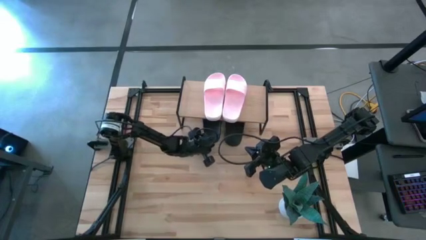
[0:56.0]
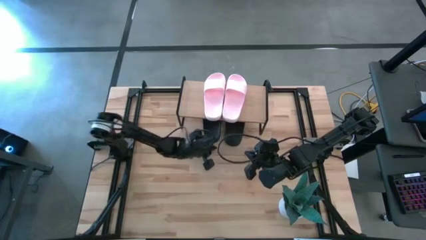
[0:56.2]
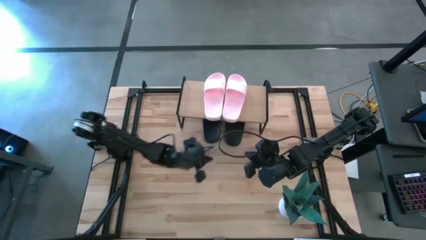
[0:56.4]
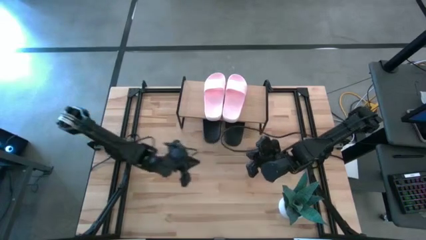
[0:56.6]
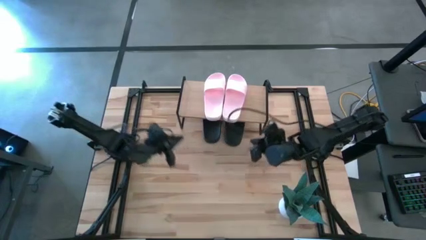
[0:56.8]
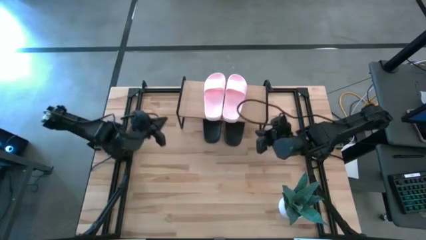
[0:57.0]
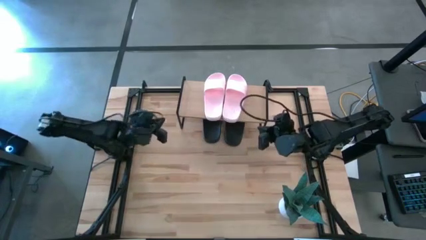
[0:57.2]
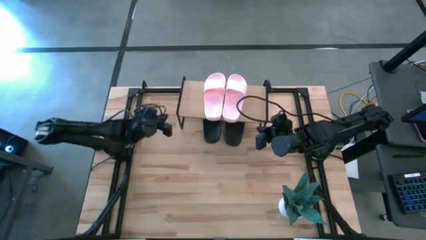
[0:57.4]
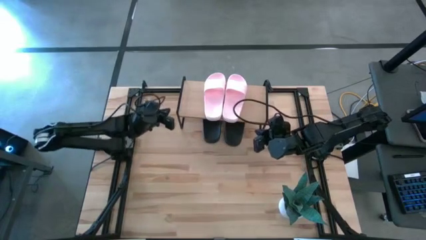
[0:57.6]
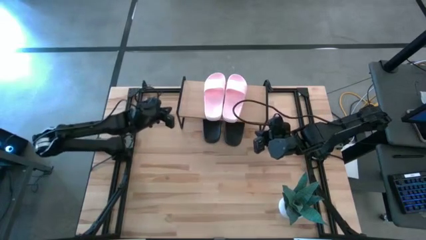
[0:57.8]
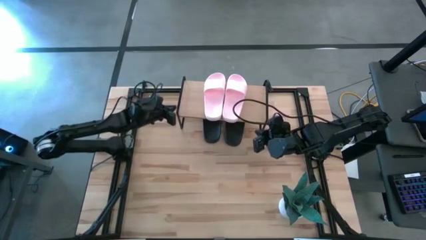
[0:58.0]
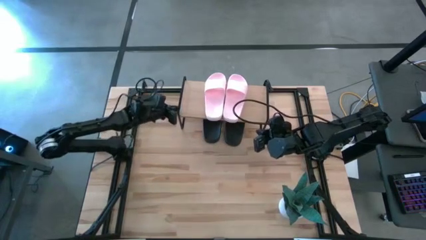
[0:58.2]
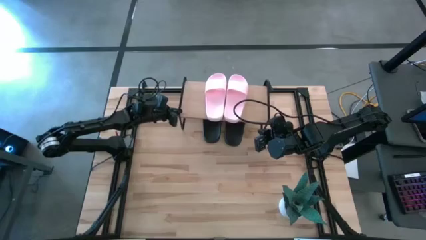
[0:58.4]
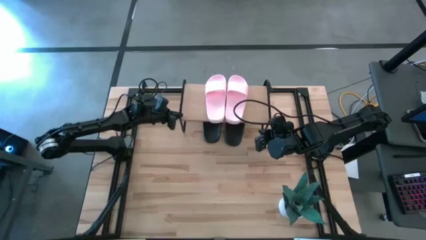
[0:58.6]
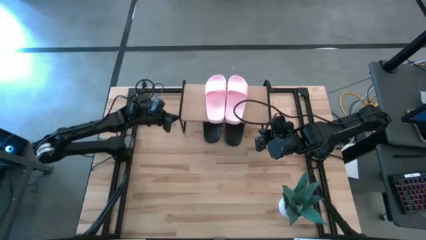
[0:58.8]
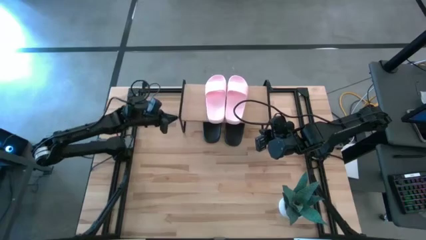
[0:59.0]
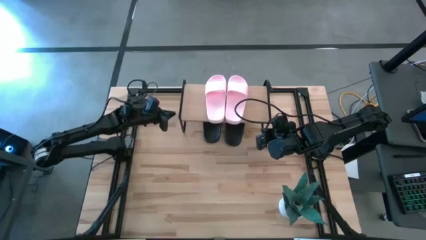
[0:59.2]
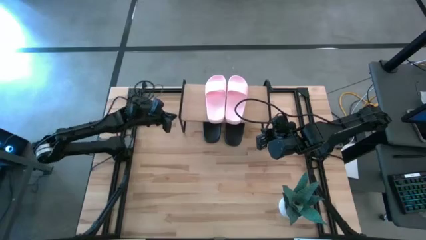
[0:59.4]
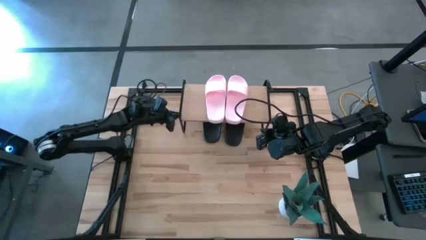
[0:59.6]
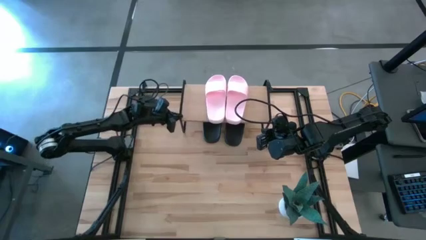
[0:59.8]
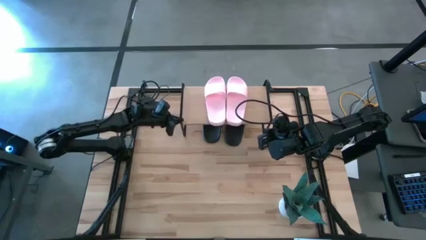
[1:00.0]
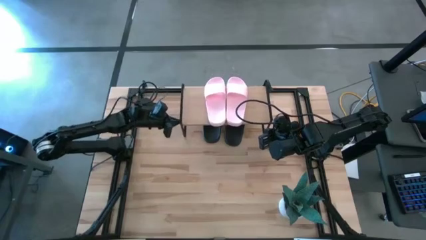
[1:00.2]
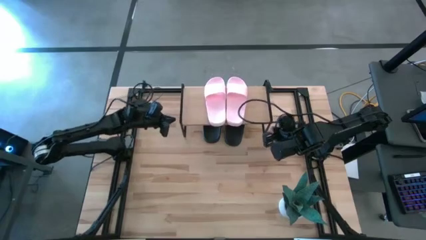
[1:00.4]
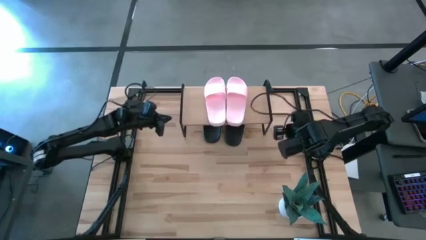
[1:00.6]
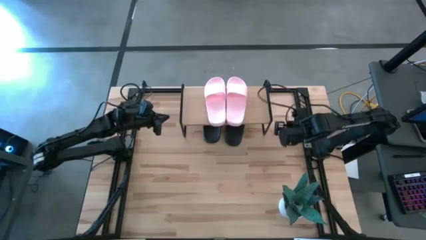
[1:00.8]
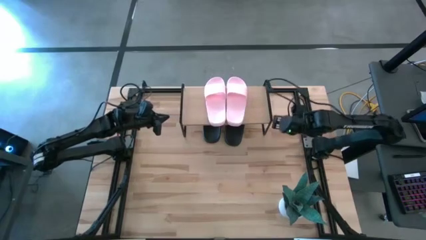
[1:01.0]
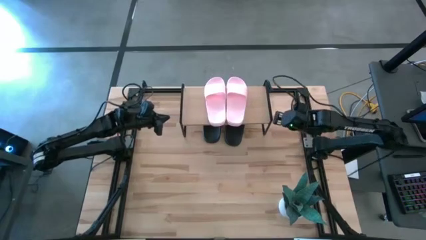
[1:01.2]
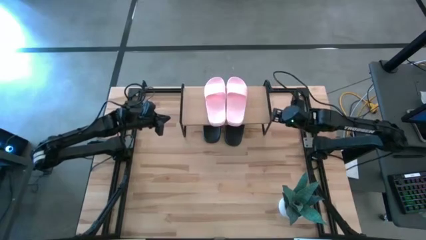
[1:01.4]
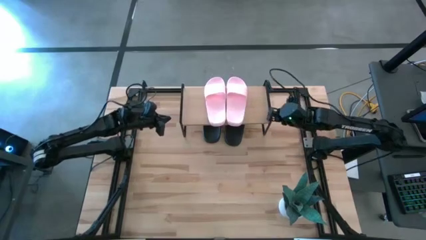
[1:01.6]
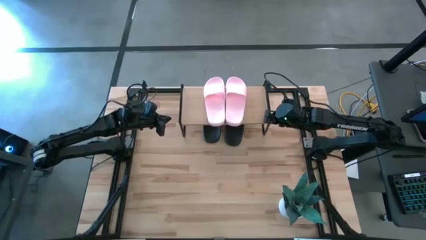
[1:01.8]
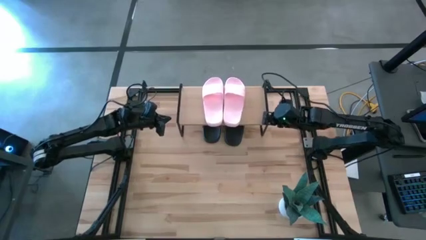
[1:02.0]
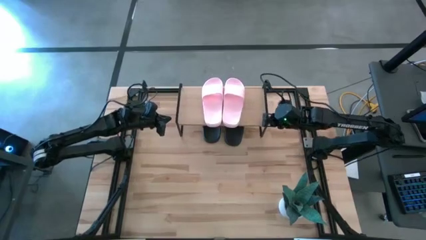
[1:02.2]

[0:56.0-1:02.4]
Task: Pick and place slides into the shelf
Adjust the shelf

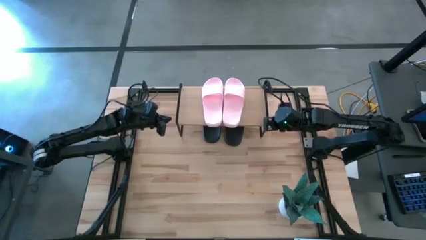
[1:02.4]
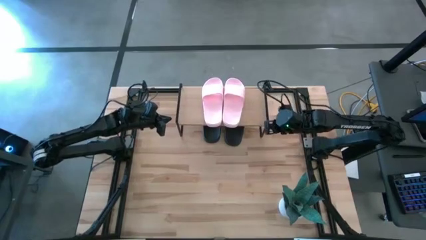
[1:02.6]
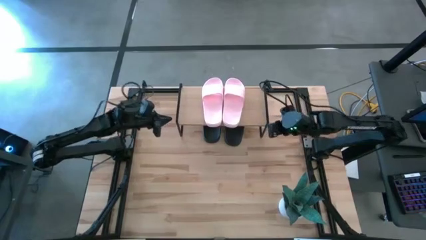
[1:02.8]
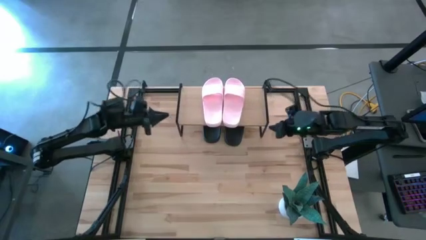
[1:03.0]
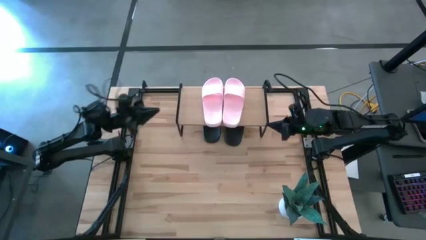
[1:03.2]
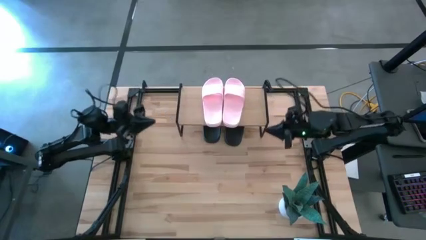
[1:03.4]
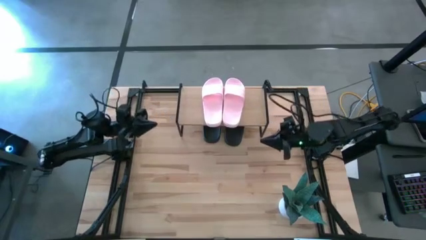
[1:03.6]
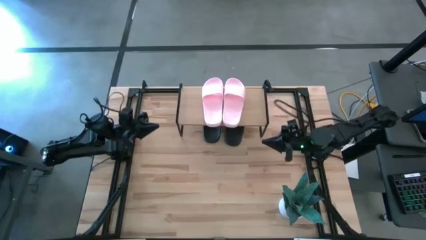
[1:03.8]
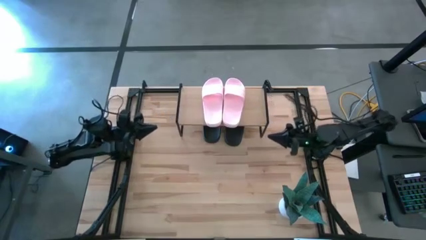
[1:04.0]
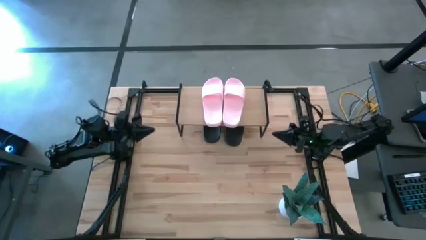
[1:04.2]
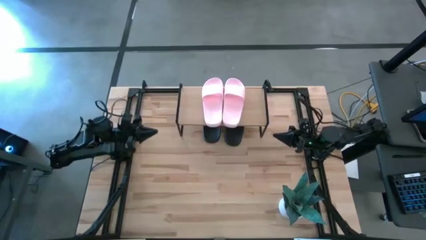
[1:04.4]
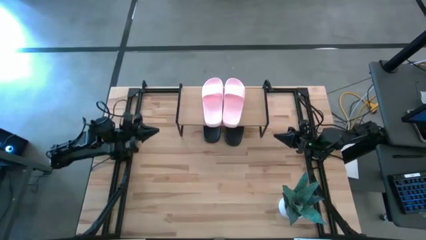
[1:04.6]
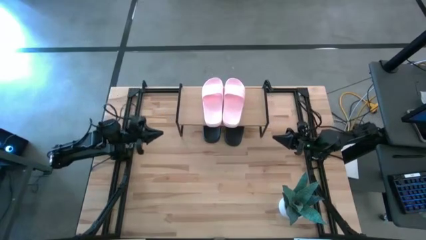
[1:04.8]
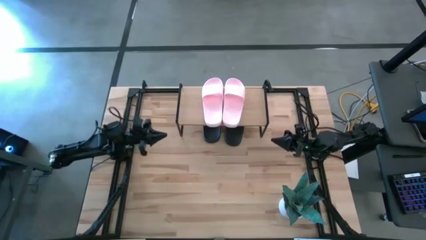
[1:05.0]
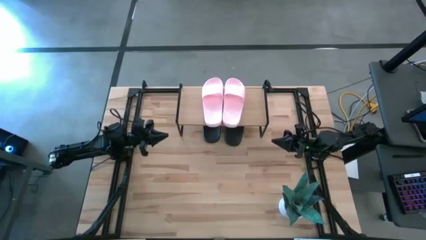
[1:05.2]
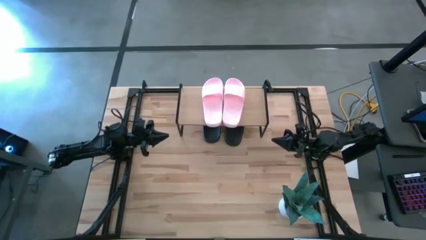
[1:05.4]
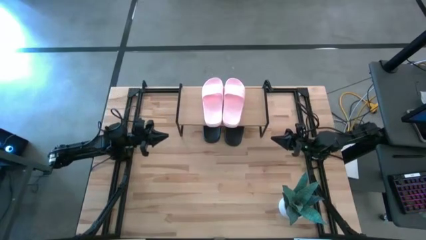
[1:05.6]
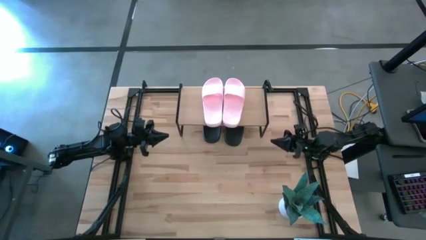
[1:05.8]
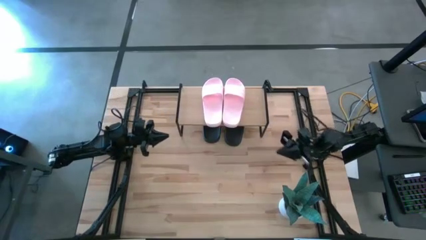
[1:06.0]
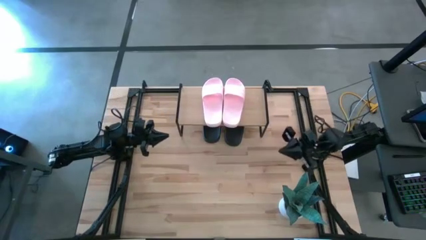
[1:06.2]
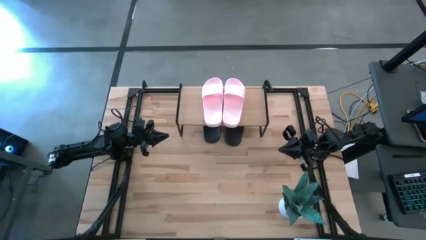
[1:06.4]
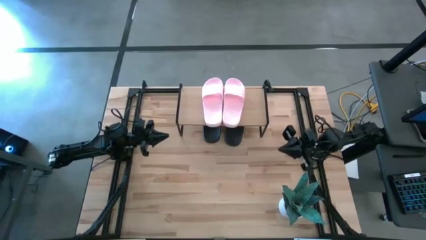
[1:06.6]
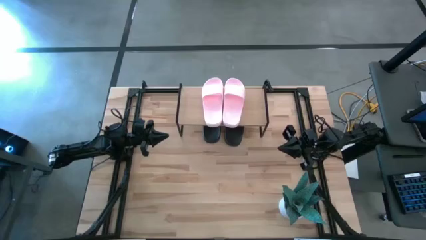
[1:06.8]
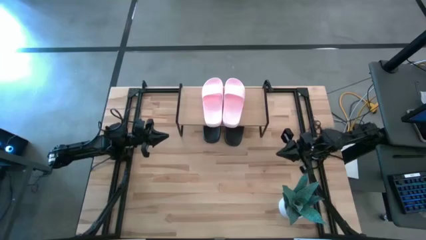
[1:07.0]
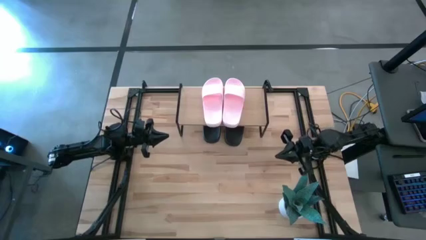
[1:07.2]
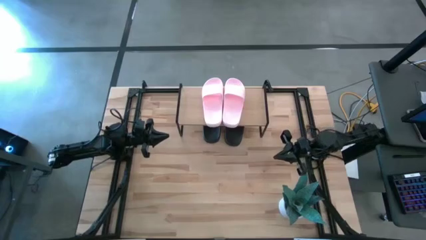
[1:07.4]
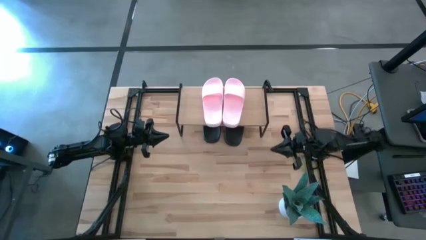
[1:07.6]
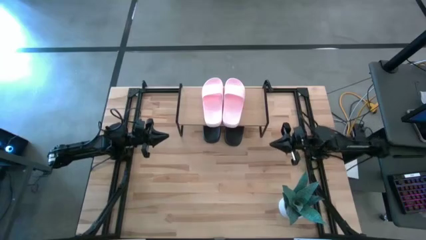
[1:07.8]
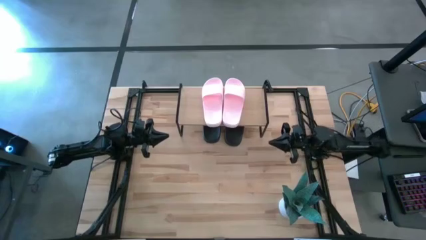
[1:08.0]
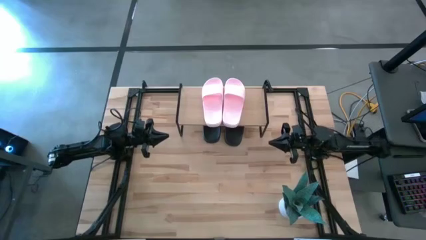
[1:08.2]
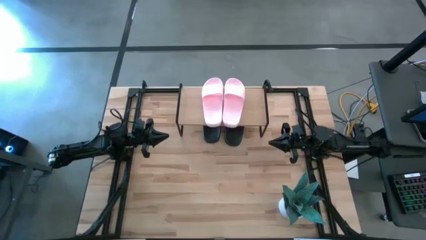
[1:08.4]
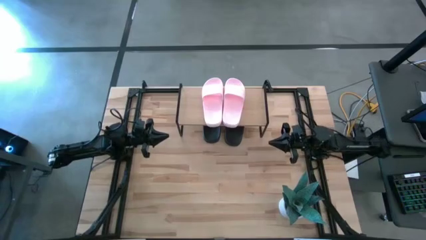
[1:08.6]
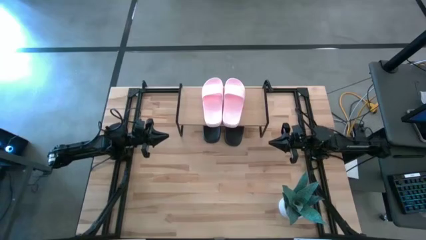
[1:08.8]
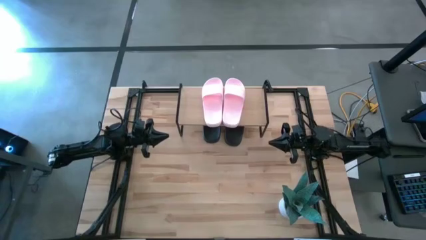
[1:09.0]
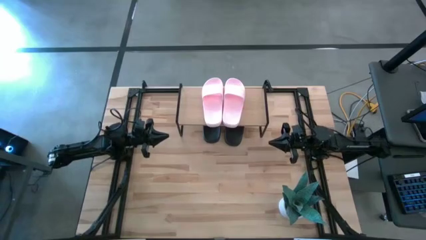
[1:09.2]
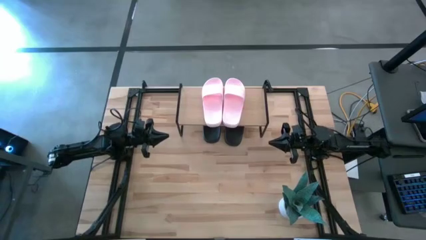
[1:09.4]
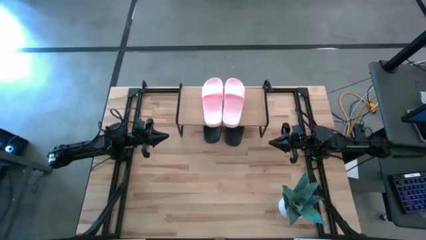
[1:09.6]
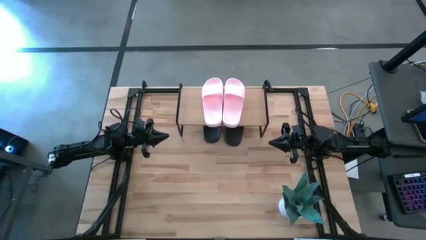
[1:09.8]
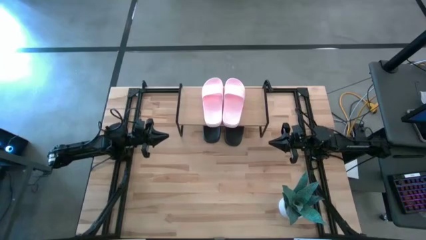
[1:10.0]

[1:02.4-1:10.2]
Return to Home Position

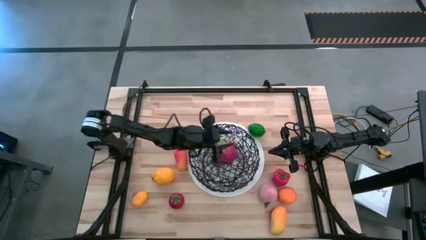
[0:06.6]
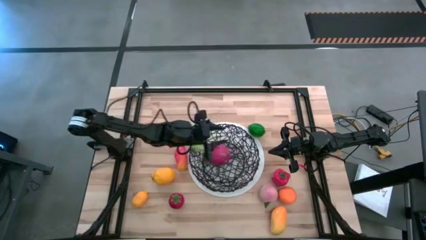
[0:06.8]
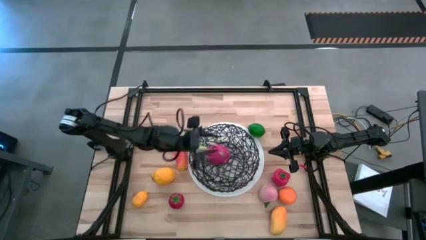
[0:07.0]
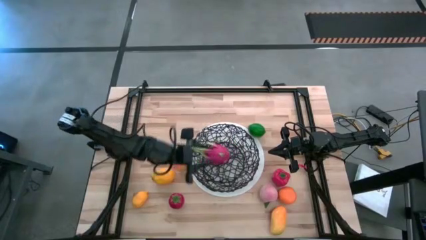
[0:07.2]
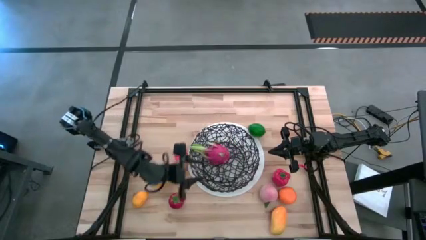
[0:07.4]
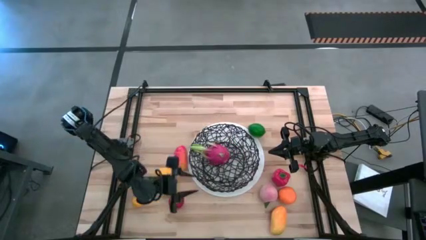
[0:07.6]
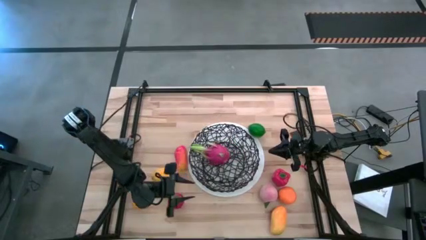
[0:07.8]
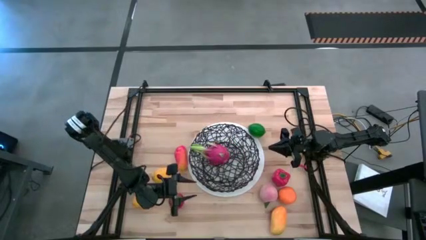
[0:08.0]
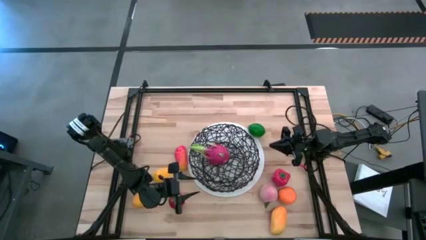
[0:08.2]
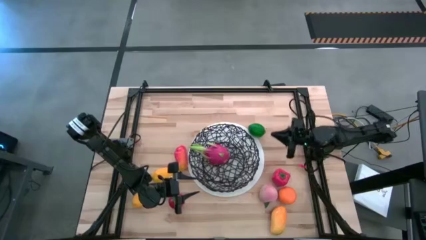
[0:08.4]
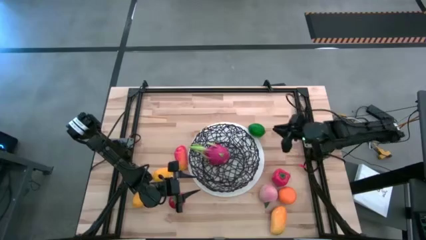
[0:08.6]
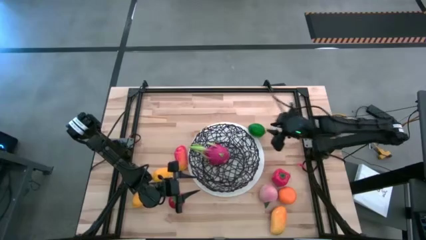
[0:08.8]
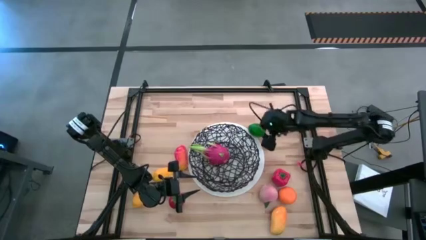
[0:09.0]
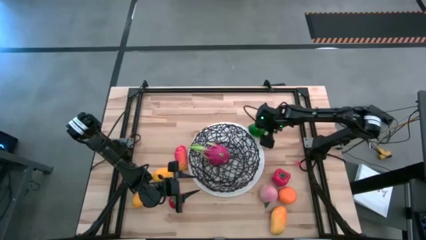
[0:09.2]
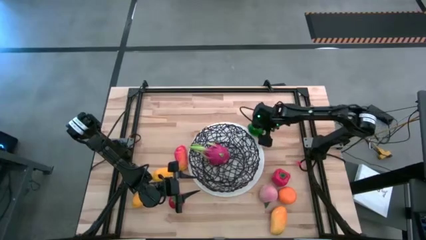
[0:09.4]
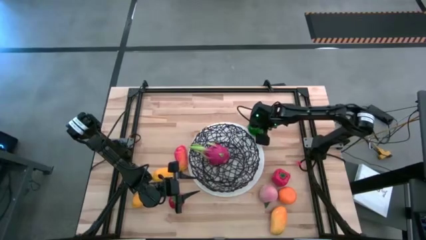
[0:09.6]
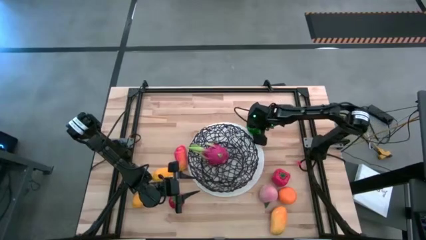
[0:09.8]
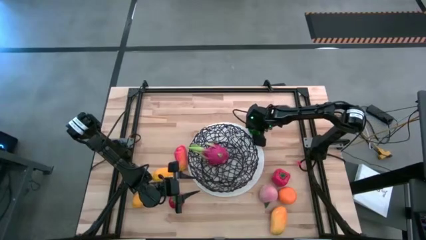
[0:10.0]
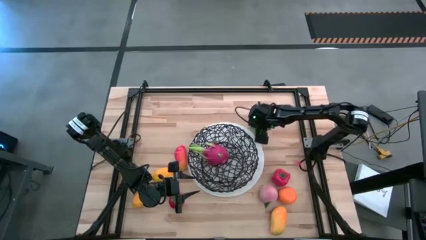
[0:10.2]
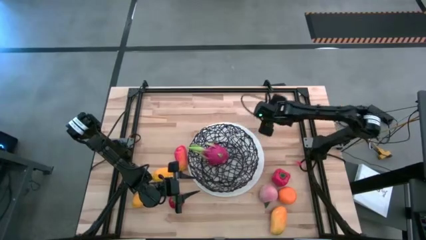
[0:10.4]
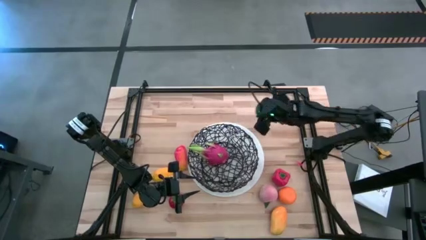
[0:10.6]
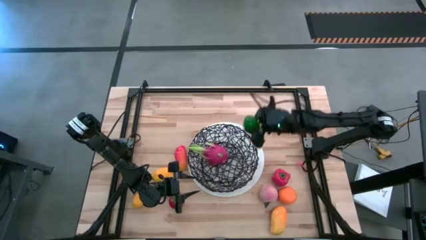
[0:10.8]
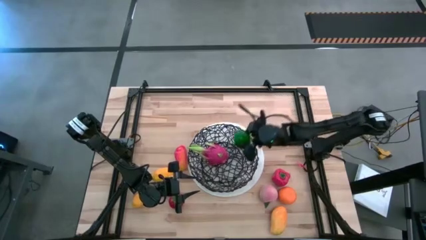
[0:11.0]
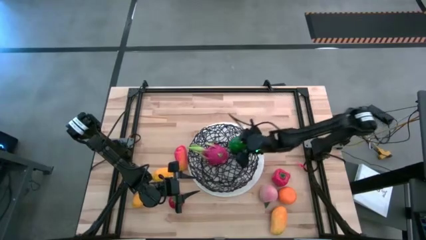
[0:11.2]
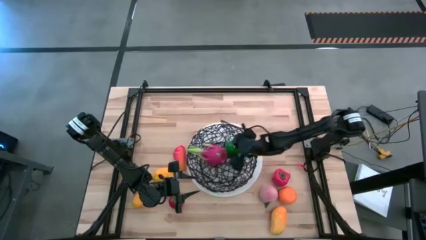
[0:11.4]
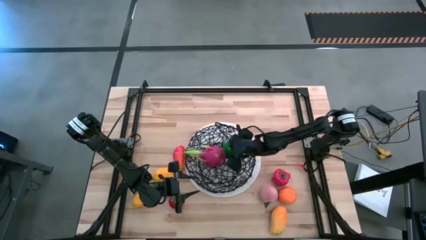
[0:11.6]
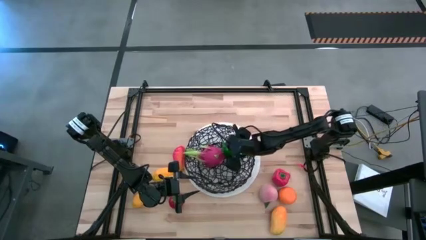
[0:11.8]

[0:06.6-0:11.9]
Task: Build produce basket
Put the lime into the basket
